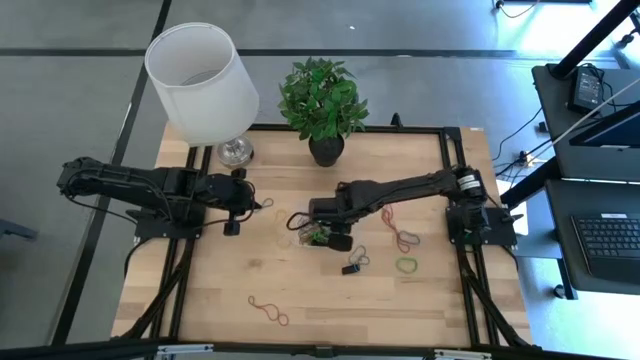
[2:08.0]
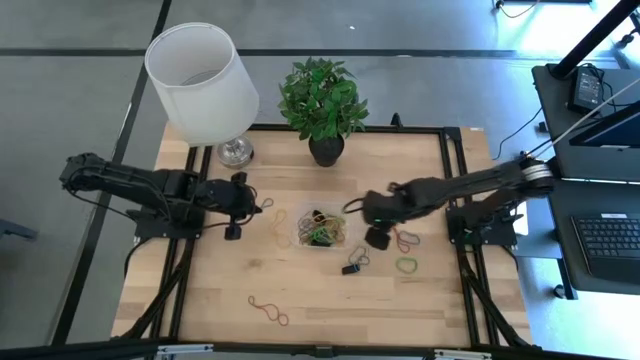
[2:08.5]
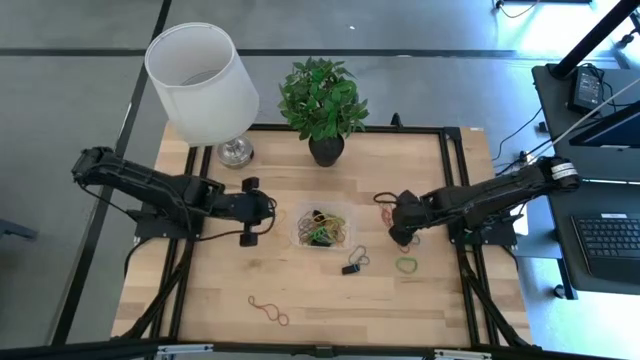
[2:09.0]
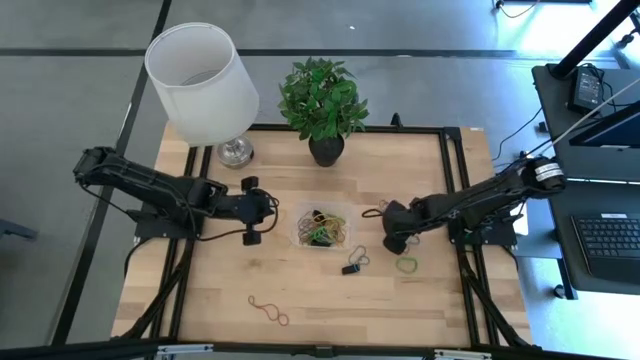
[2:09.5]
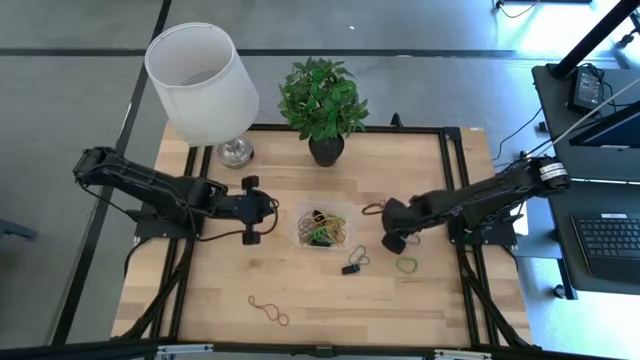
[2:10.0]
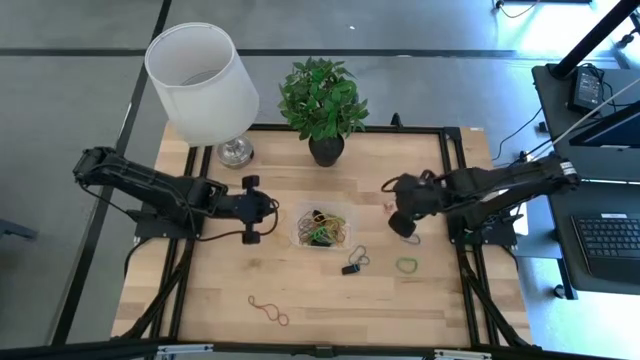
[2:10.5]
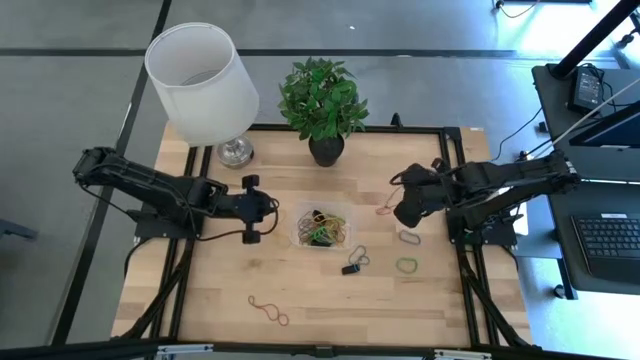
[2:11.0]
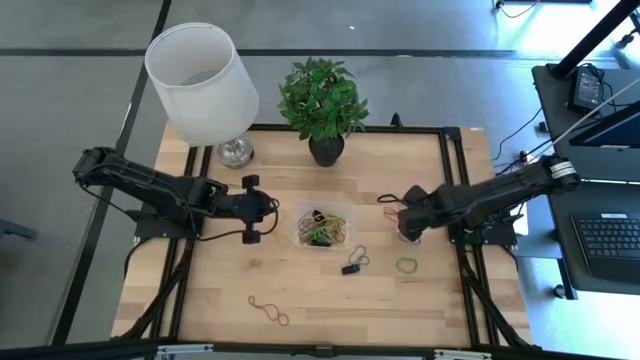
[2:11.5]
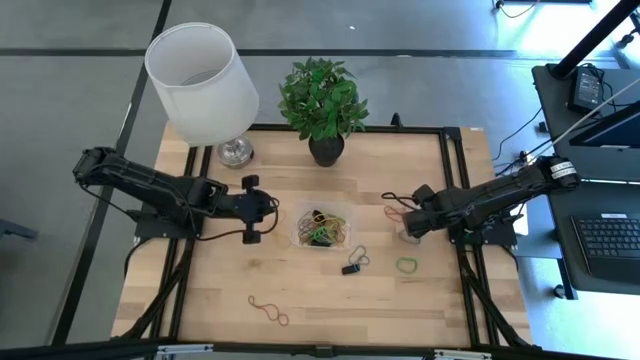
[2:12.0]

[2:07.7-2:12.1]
Task: Pick and place rubber bands into bin
Put the middle red rubber band into the transparent container

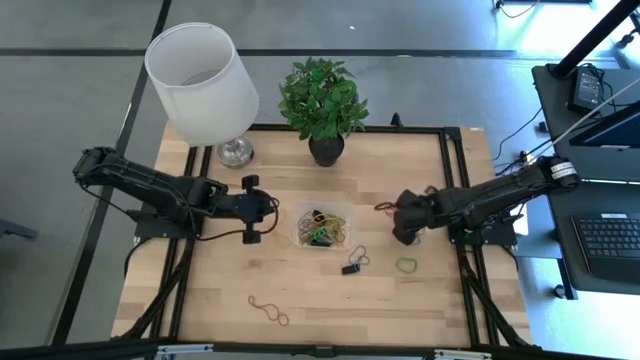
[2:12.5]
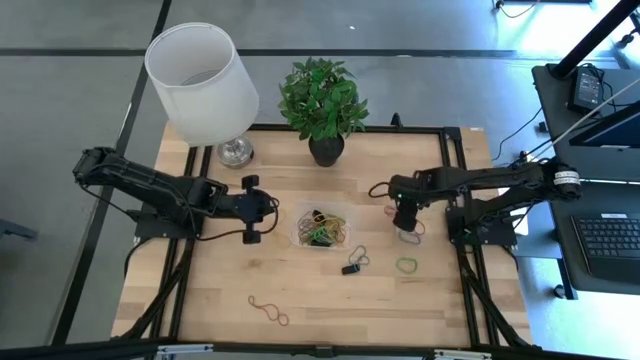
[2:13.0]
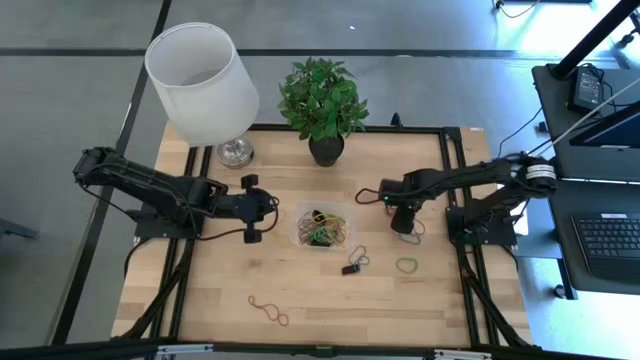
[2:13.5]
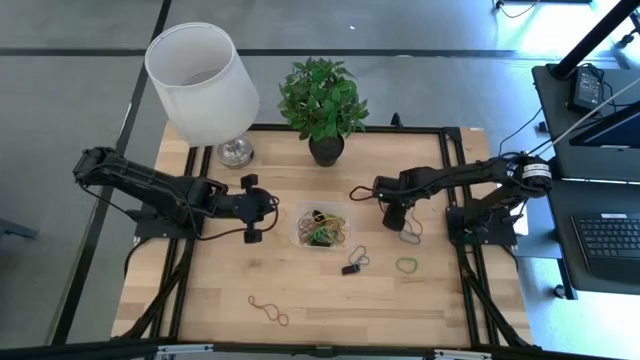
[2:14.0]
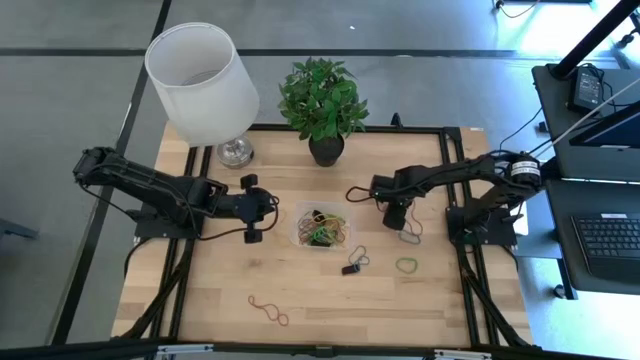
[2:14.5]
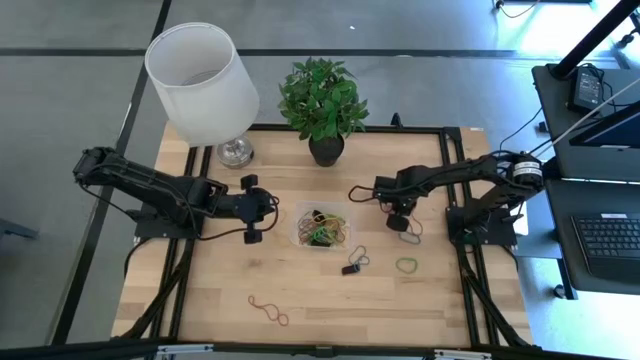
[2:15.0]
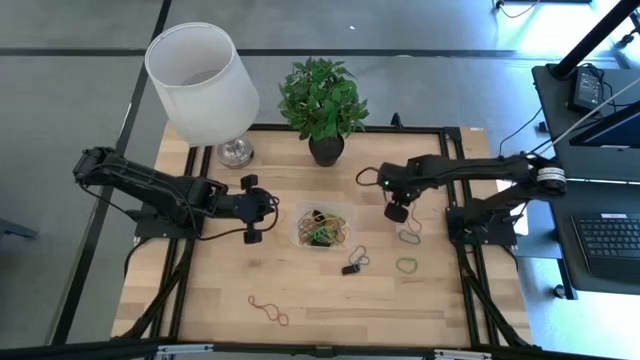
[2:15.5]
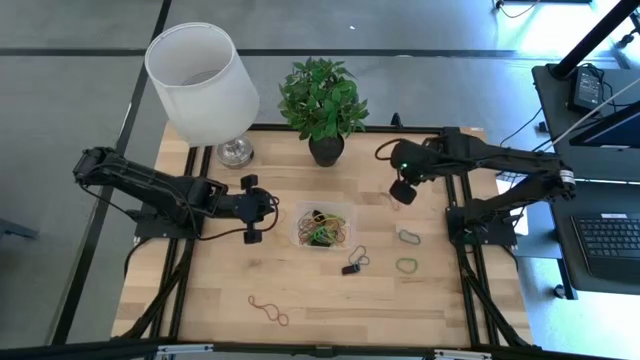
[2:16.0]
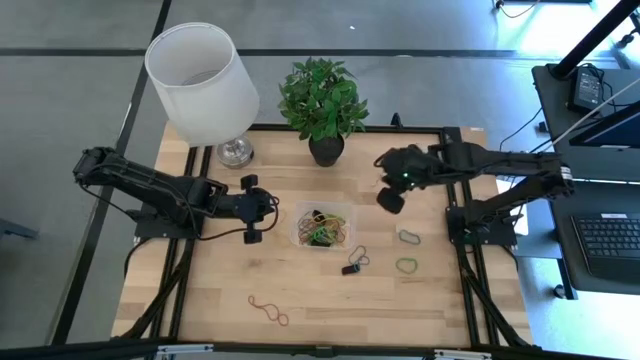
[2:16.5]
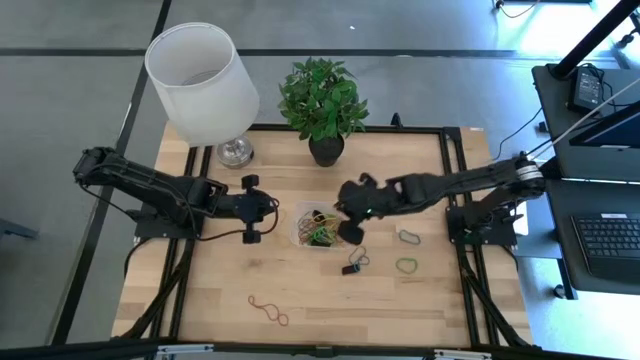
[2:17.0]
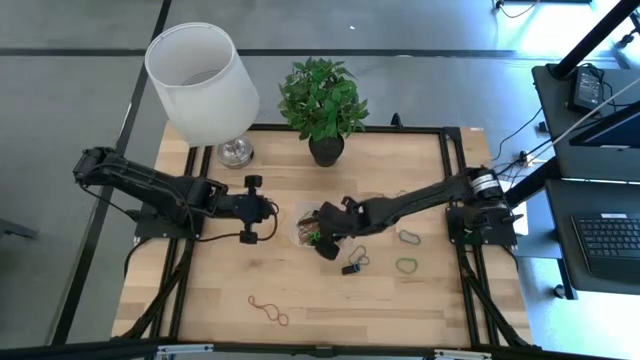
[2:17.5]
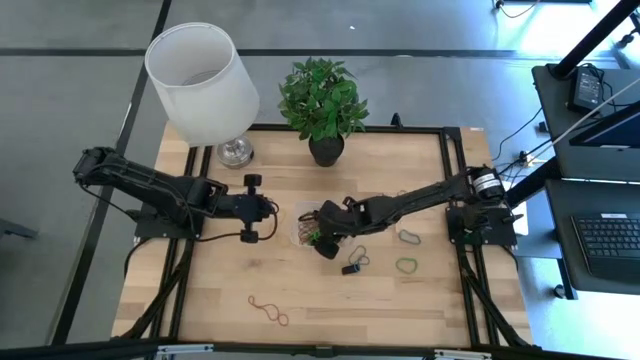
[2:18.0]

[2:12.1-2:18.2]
Put the left red rubber band into the transparent container

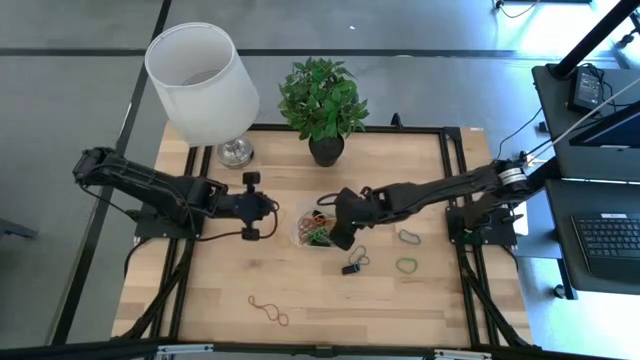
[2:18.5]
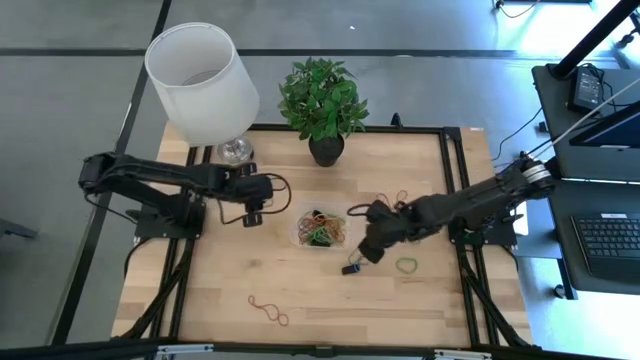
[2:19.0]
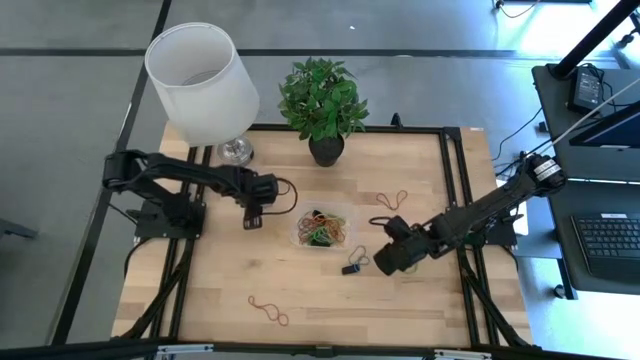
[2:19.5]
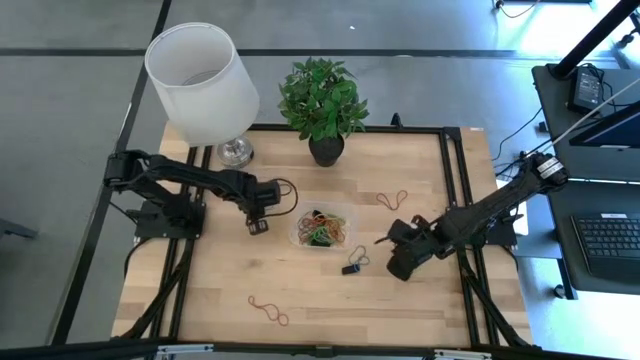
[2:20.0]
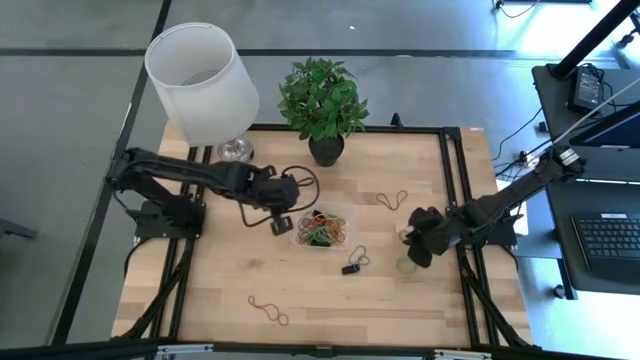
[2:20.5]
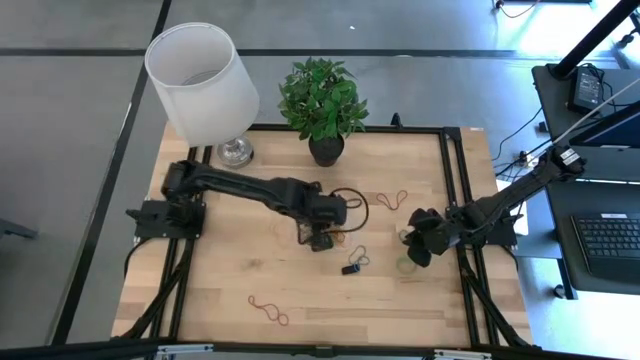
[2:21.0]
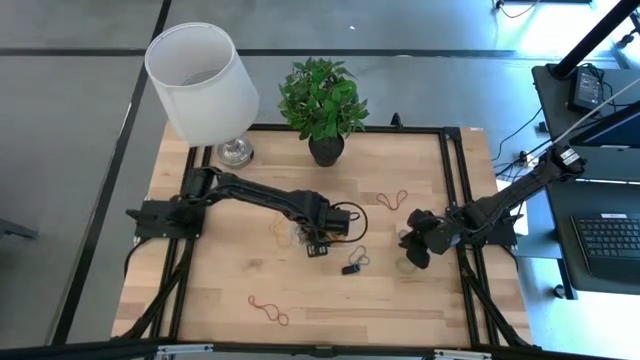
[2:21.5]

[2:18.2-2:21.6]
Put the top blue rubber band into the transparent container

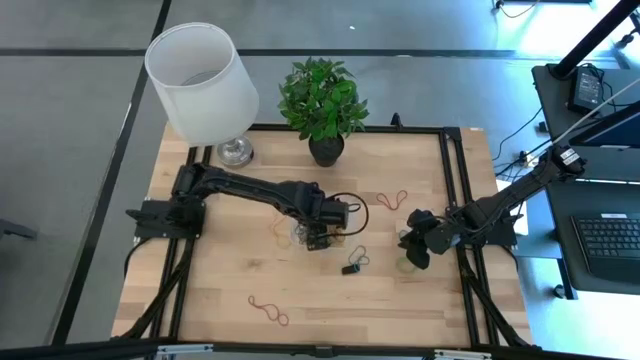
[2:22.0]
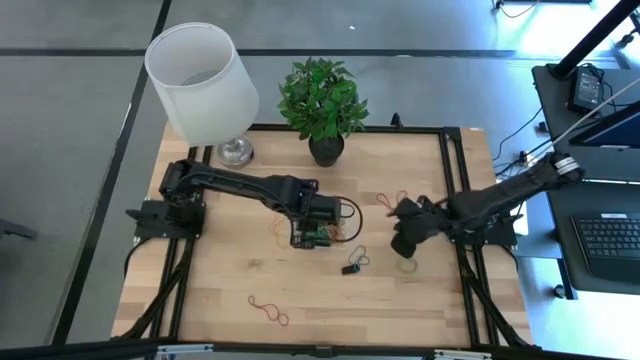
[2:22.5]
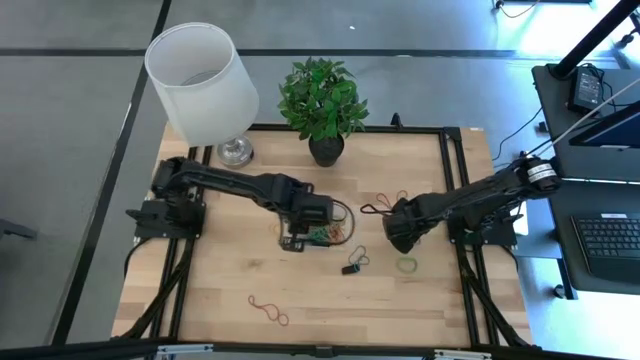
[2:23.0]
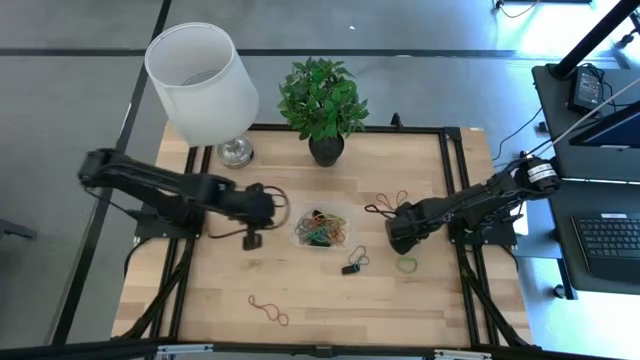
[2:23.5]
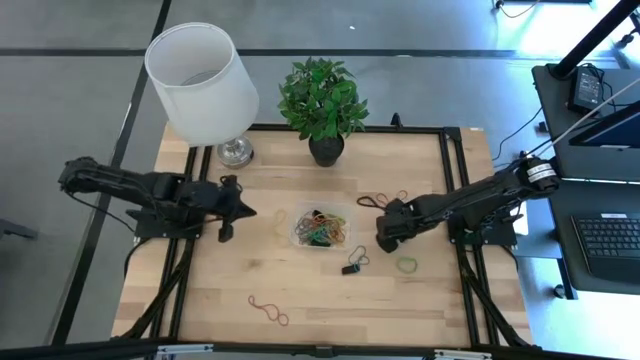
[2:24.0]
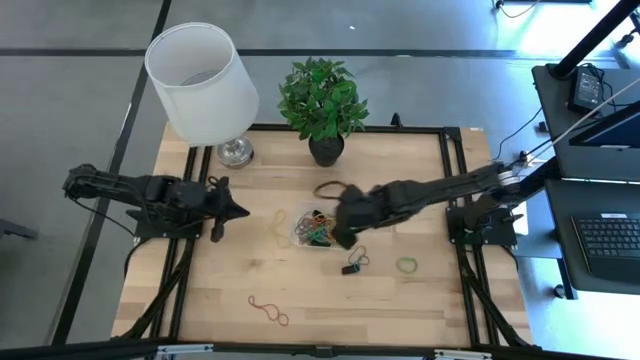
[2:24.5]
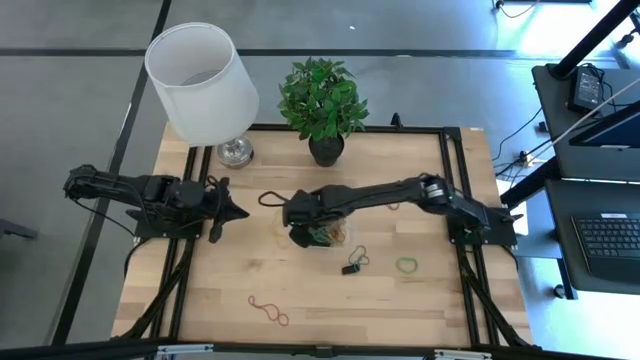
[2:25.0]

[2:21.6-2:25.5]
Put the top blue rubber band into the transparent container

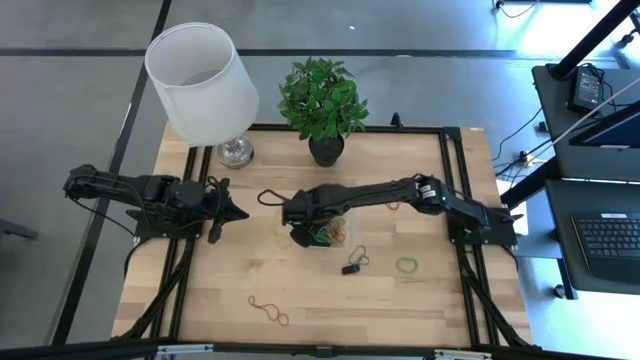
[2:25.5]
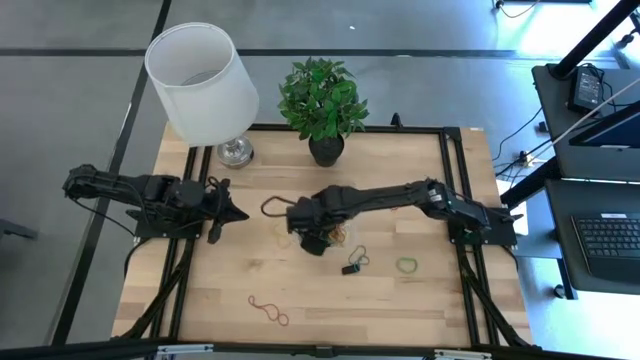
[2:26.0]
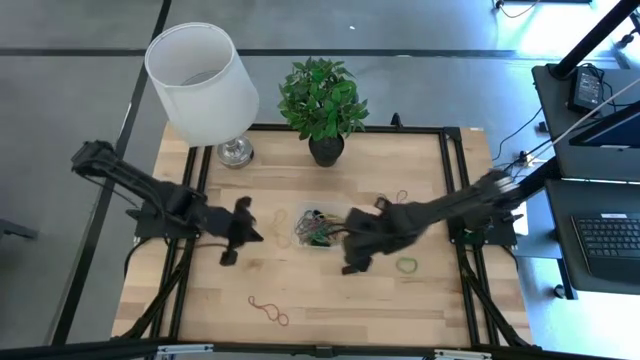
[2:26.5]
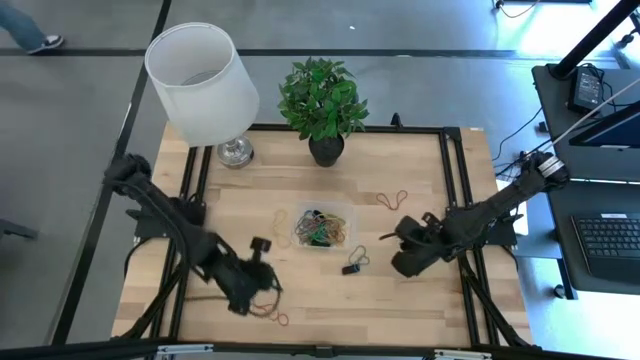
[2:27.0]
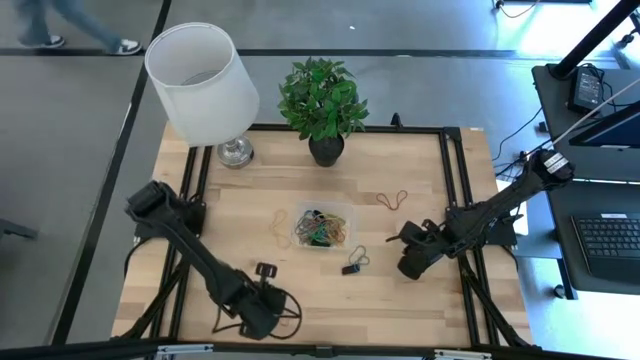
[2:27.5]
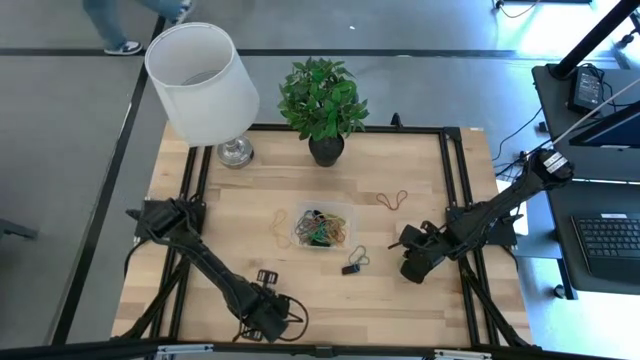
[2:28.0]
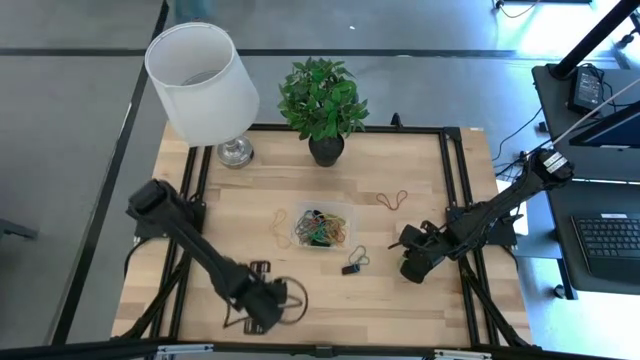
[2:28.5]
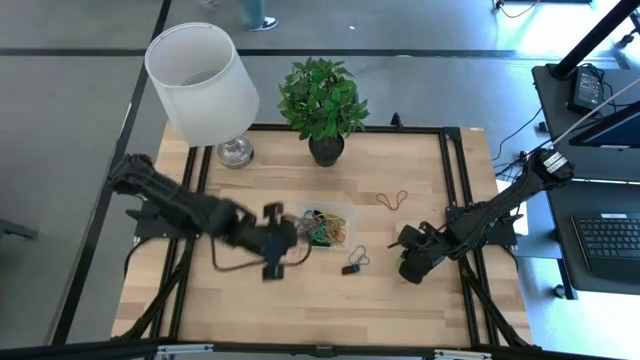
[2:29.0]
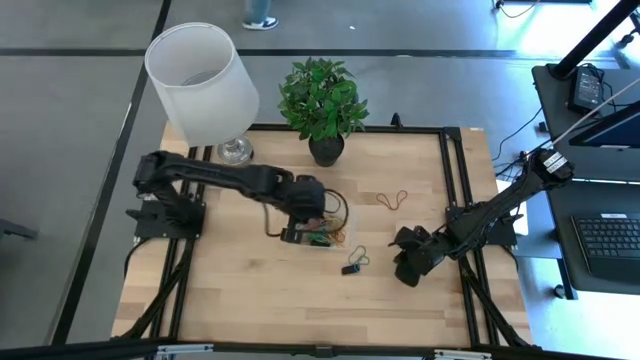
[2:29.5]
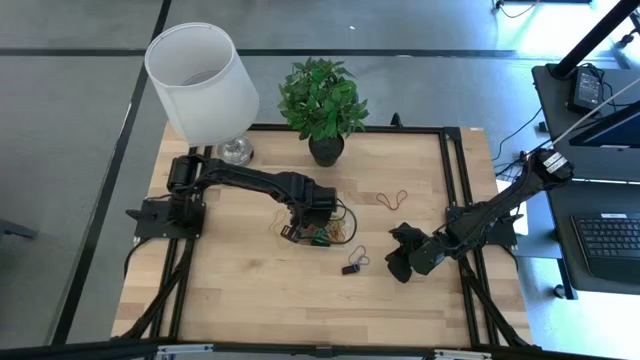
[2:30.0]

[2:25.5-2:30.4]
Put the bottom red rubber band into the transparent container
